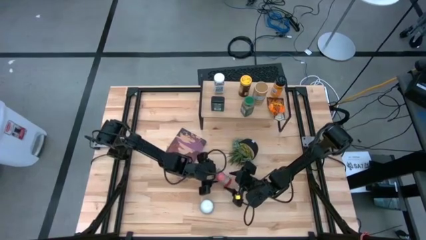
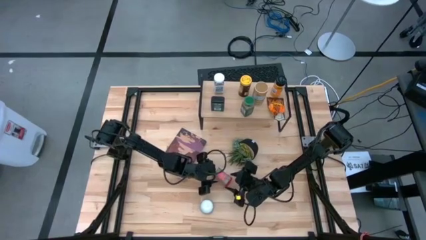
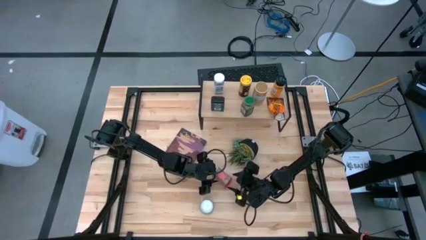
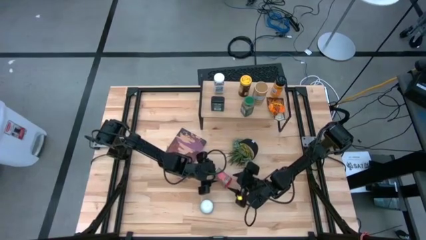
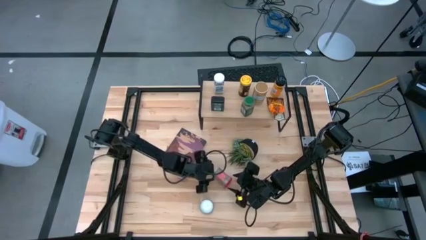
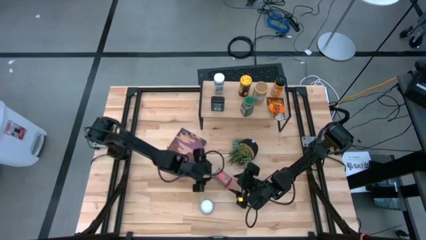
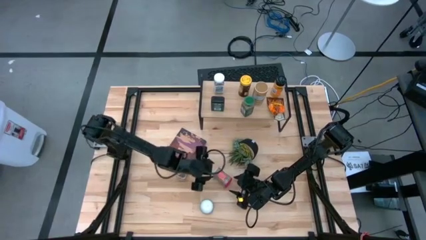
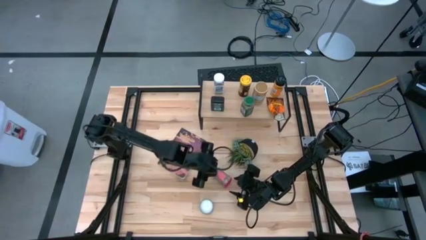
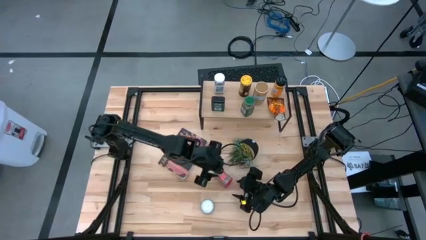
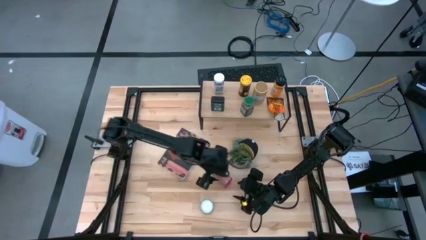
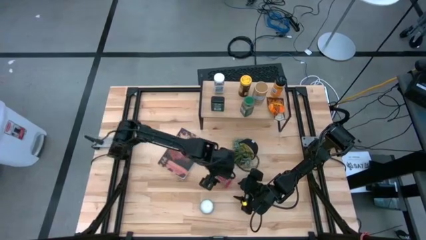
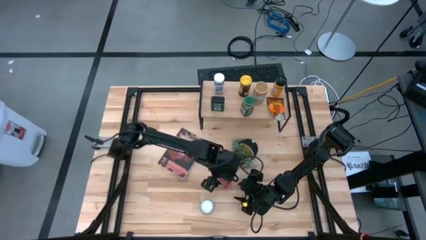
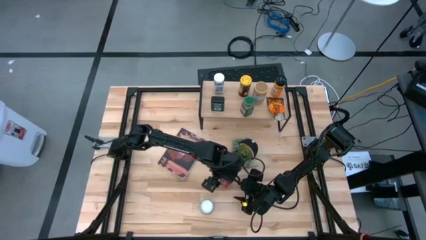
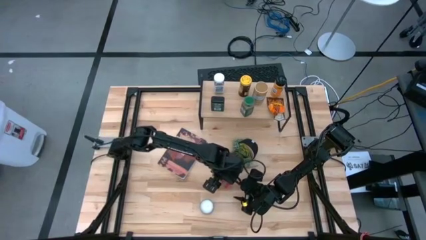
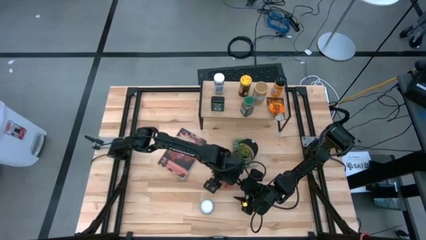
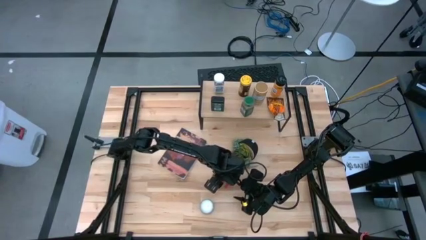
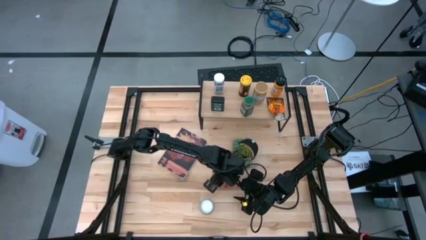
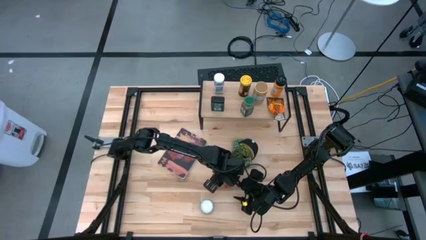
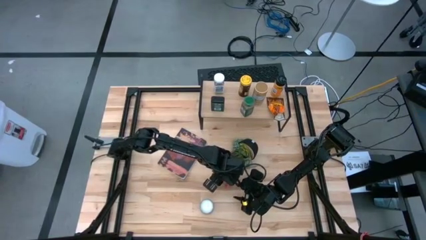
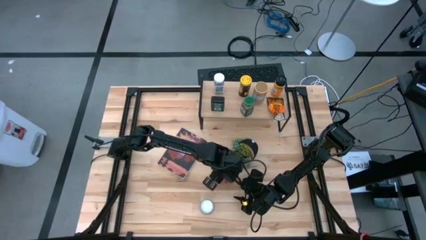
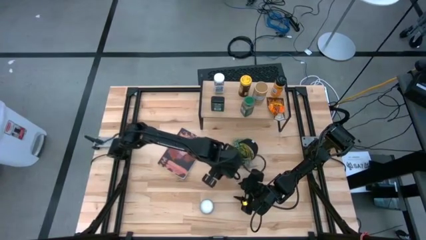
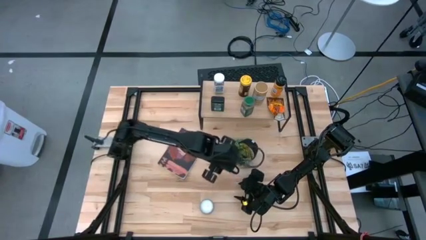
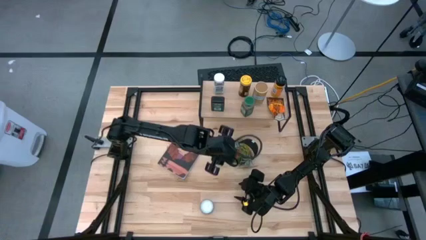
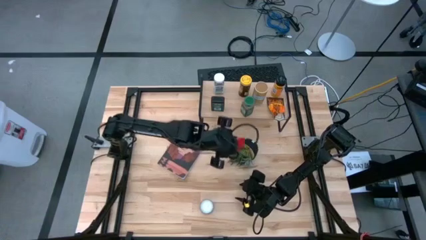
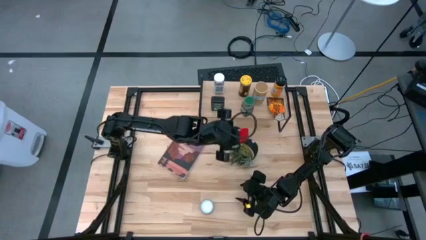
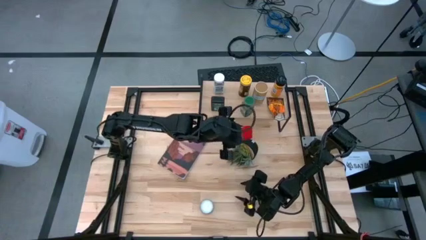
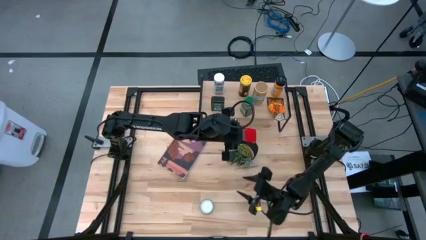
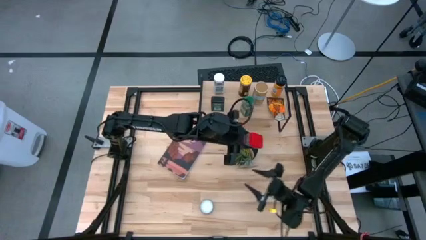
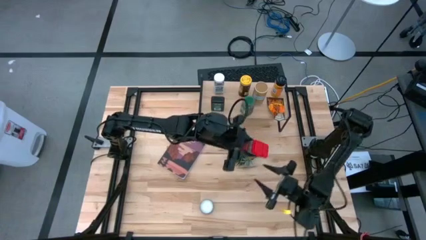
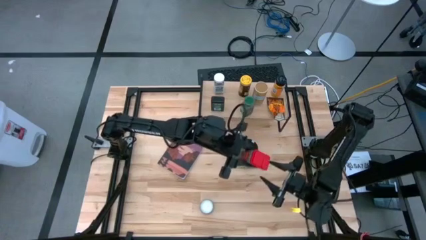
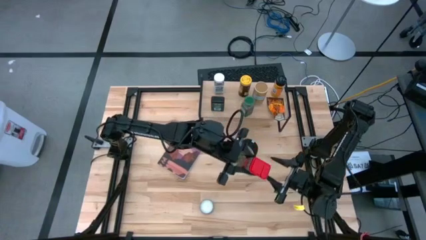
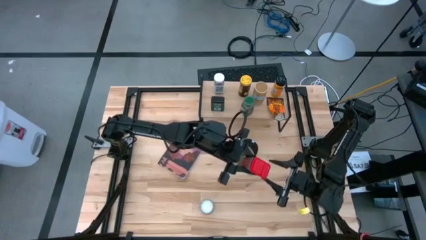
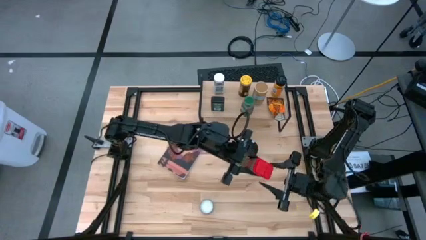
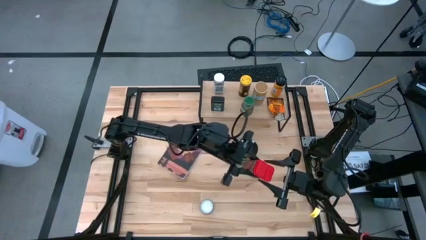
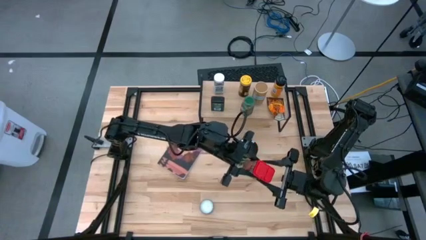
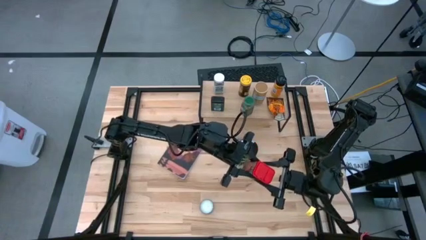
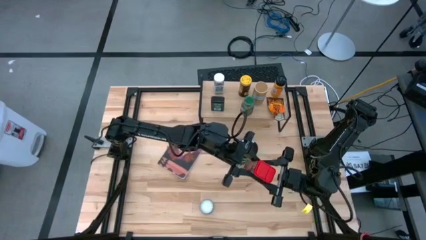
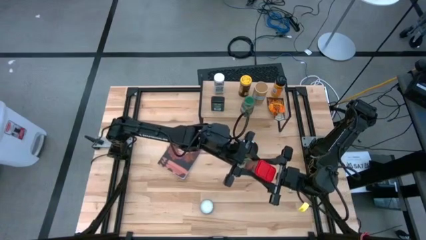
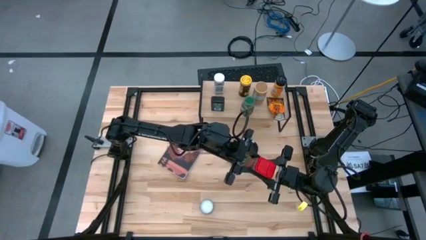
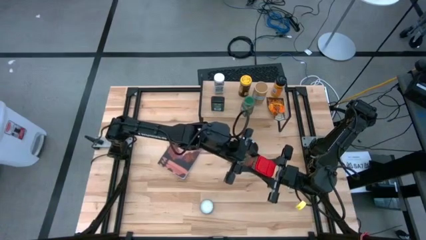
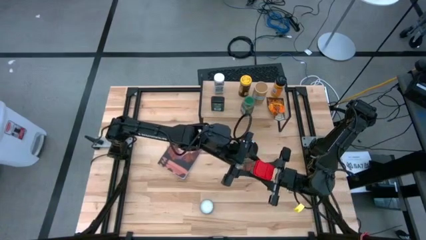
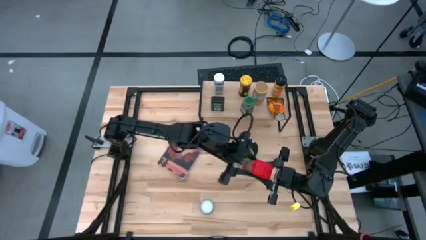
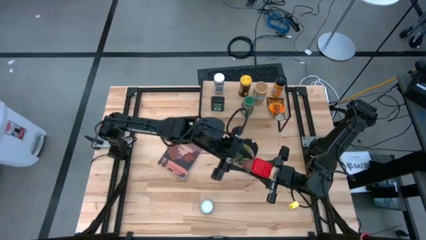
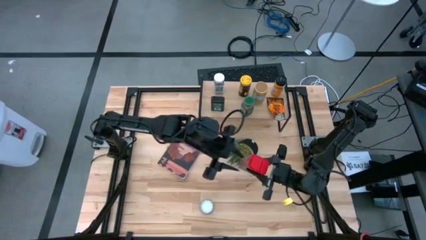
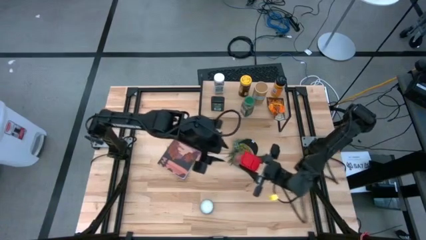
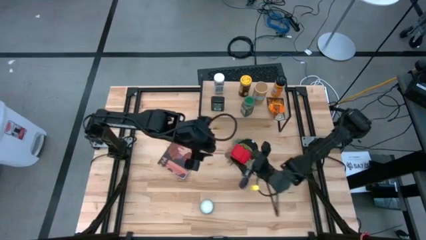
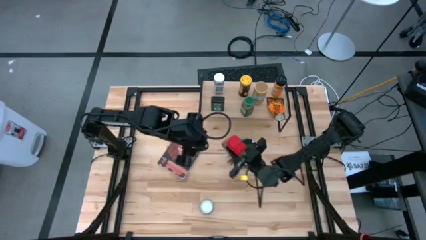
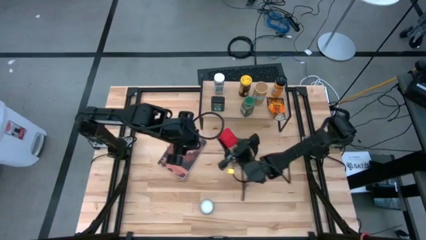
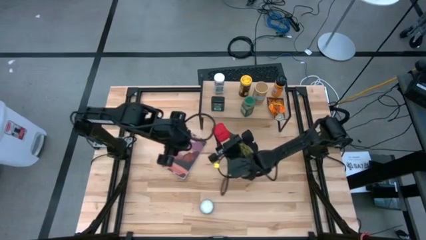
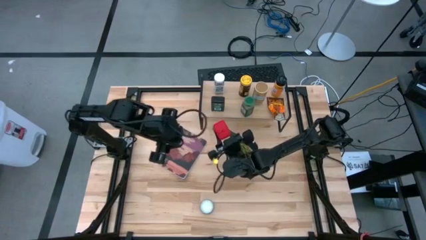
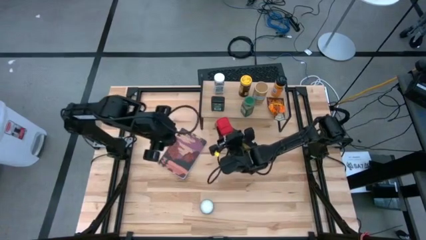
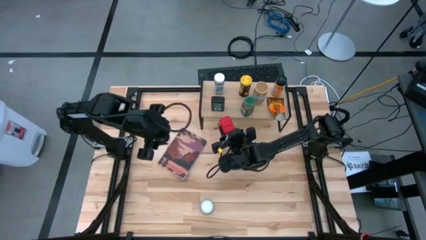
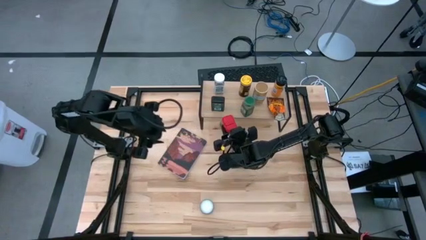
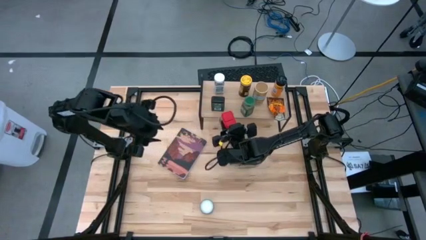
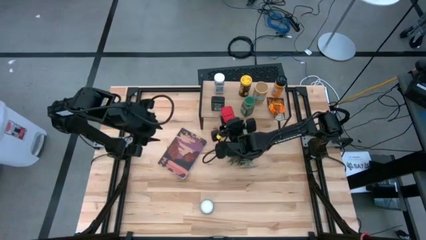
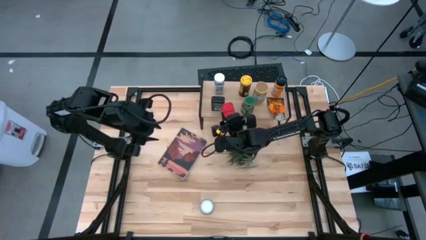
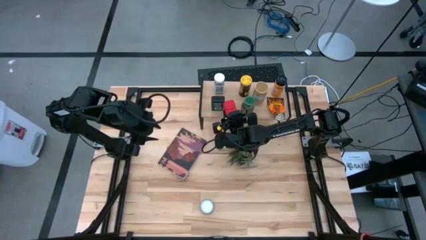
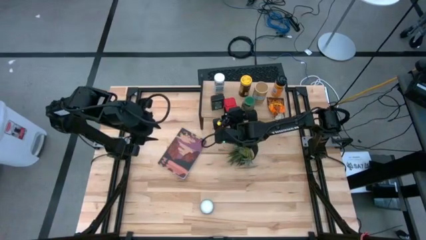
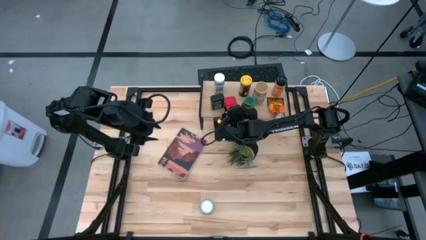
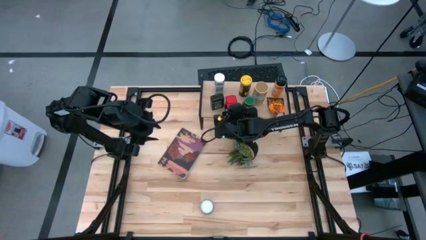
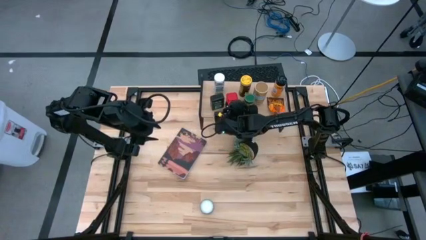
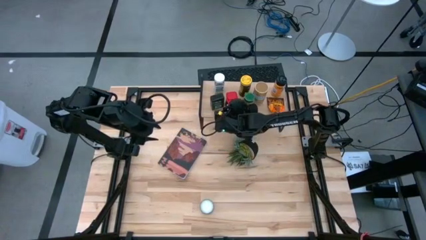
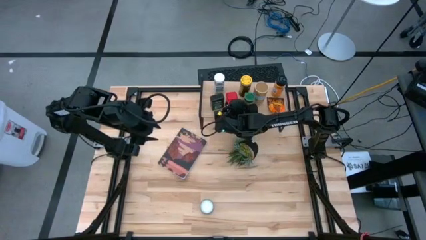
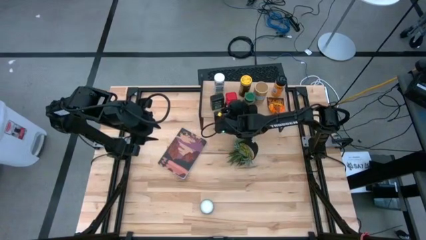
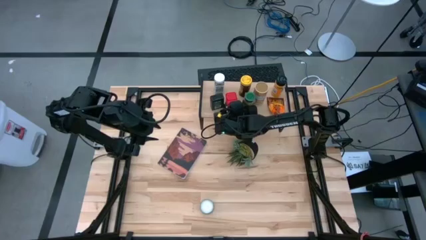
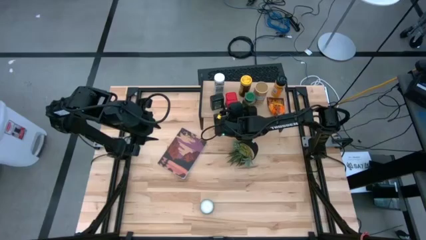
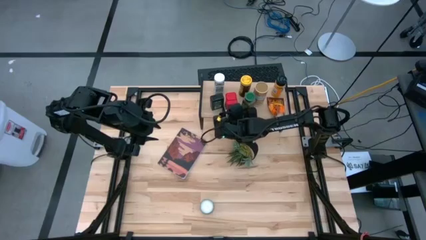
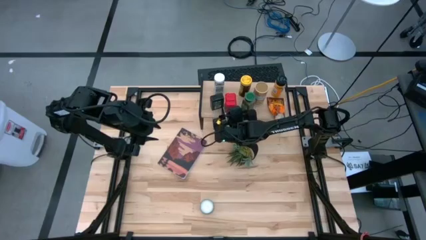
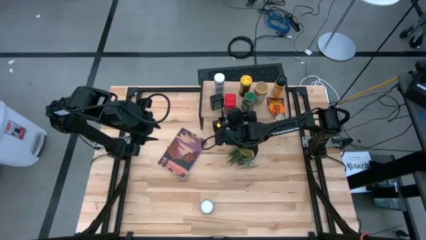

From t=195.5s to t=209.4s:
Task: Shelf spices
Put the red seasoning can on the shelf

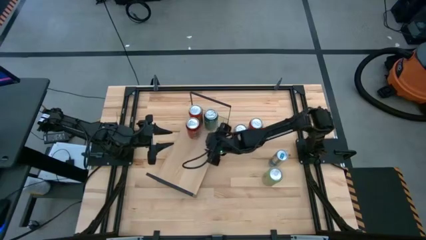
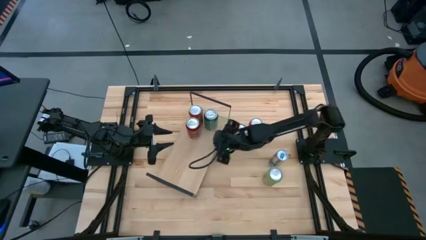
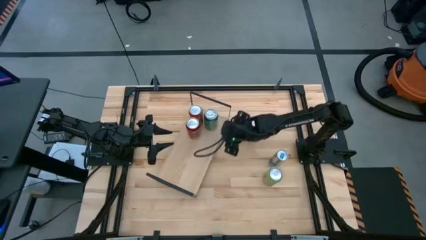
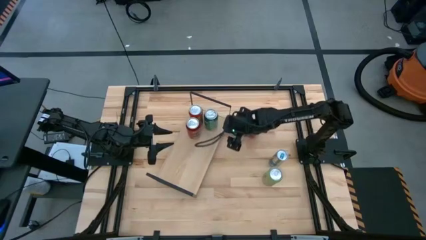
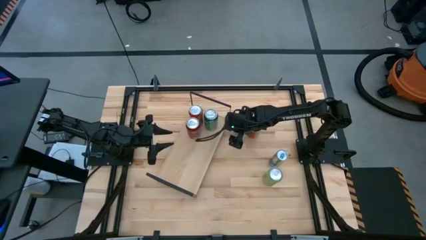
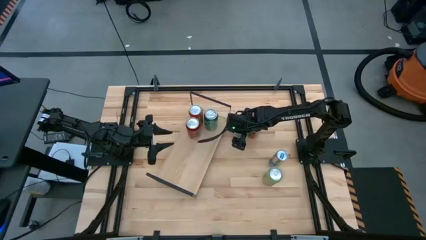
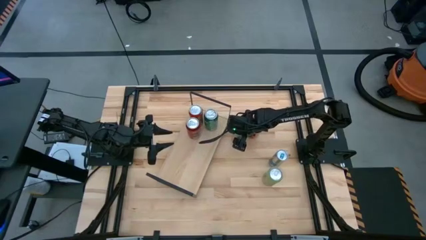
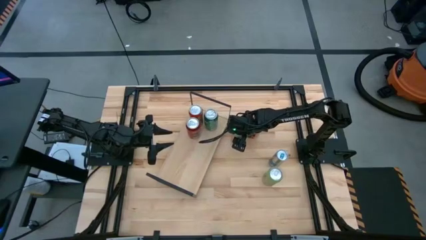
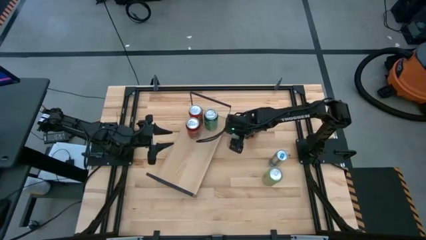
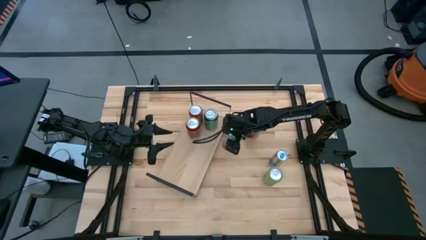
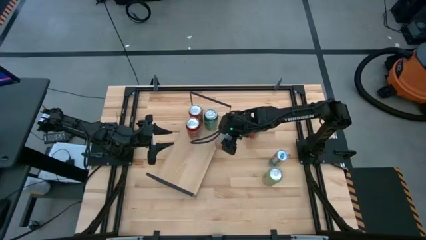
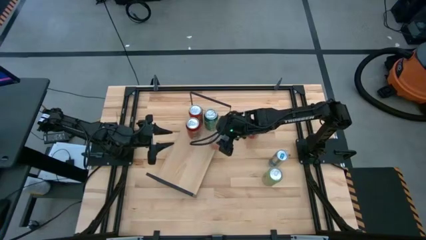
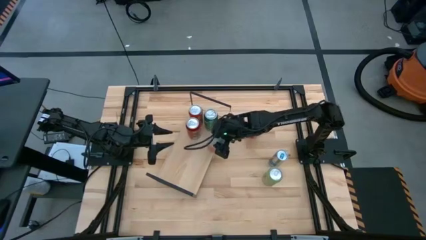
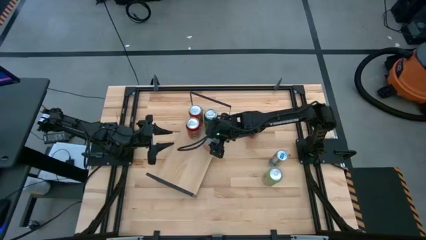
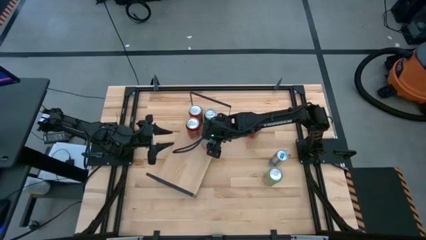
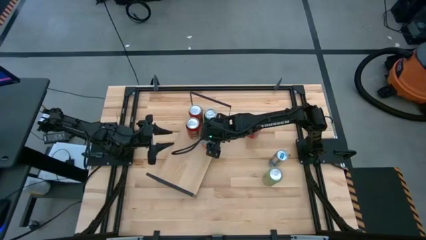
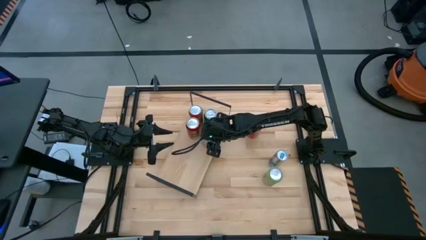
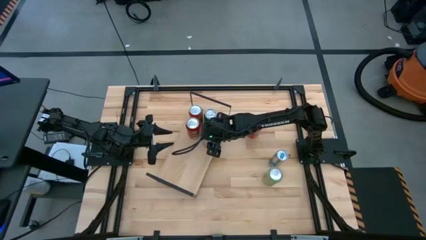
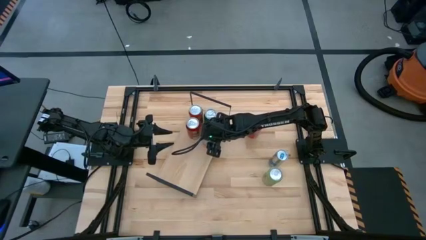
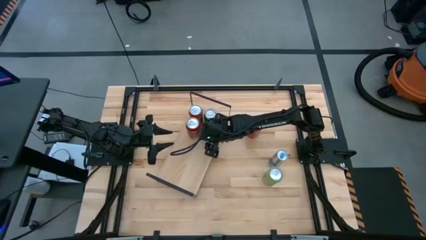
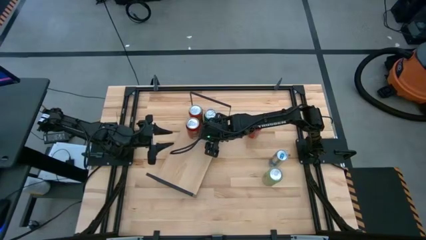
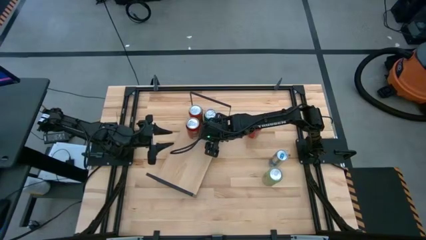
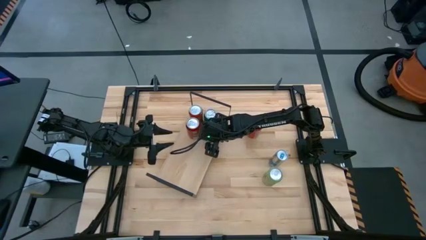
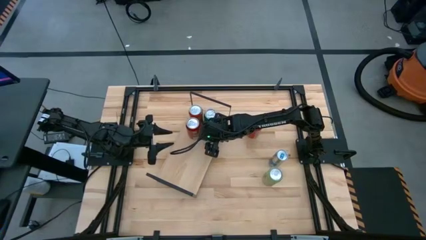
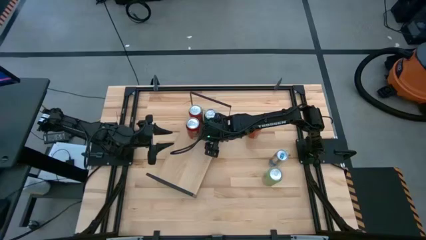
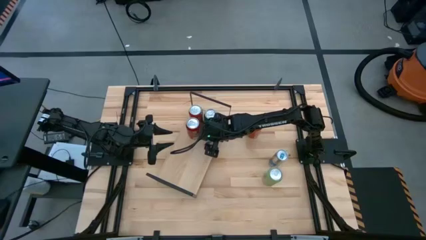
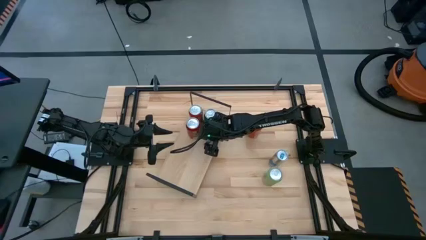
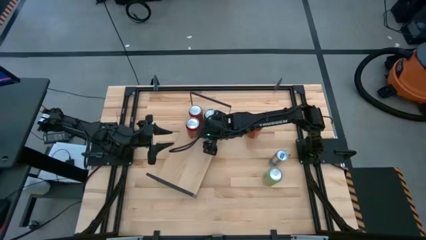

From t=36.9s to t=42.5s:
Task: Place canned beverage on shelf
Put the white soda can on the shelf
